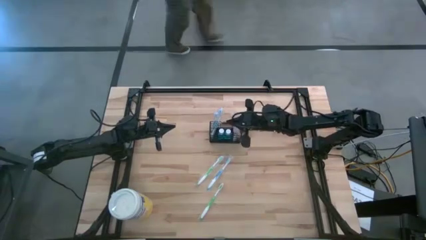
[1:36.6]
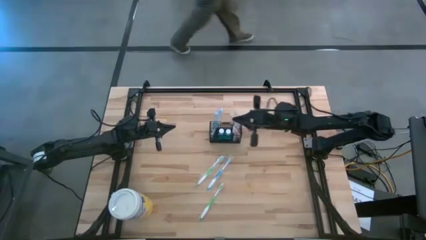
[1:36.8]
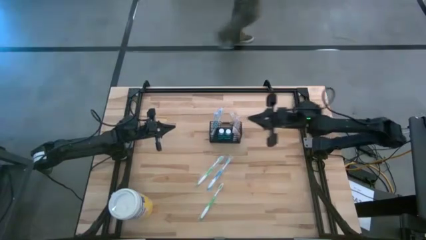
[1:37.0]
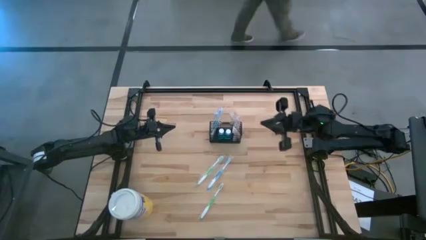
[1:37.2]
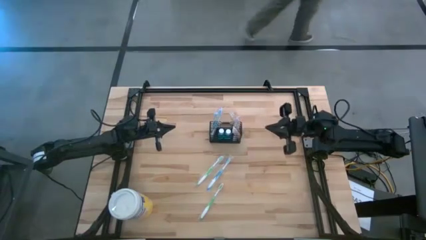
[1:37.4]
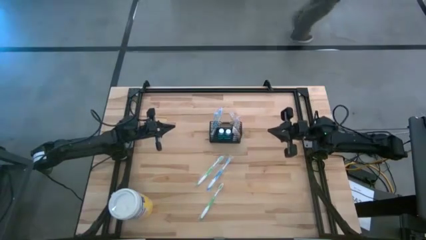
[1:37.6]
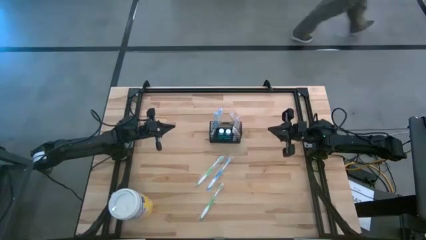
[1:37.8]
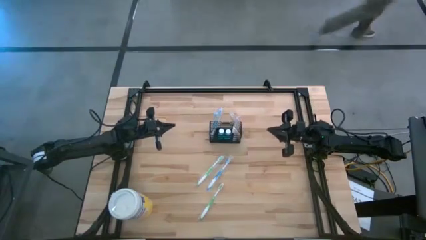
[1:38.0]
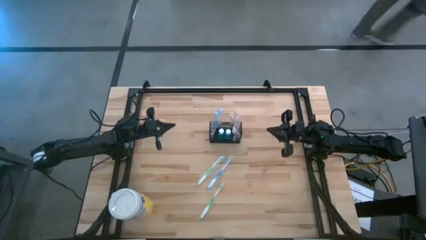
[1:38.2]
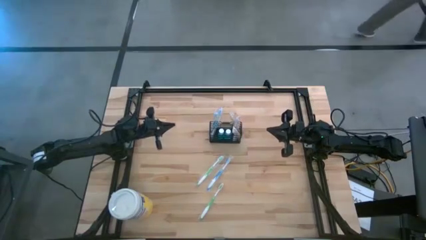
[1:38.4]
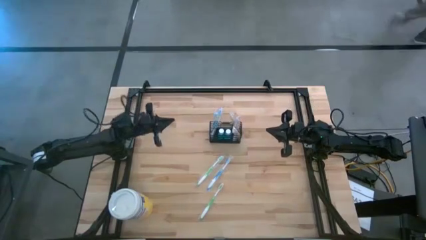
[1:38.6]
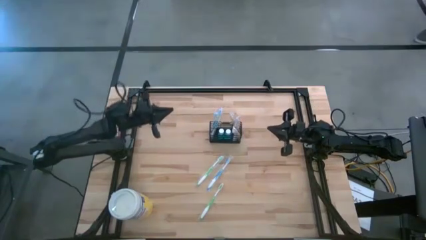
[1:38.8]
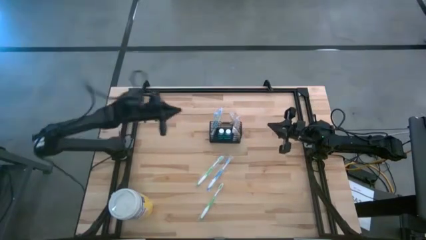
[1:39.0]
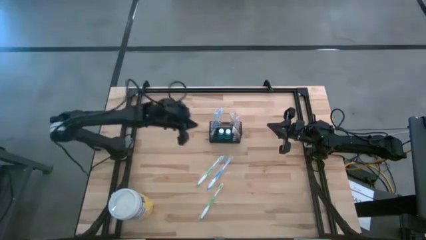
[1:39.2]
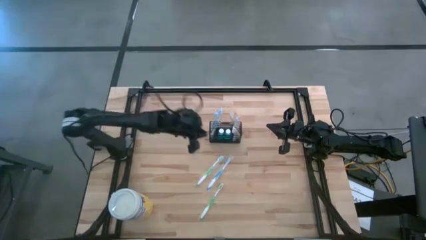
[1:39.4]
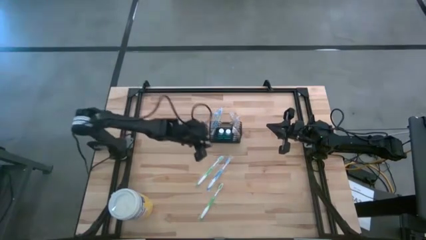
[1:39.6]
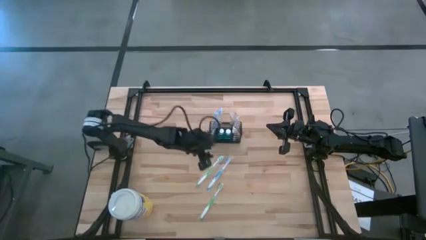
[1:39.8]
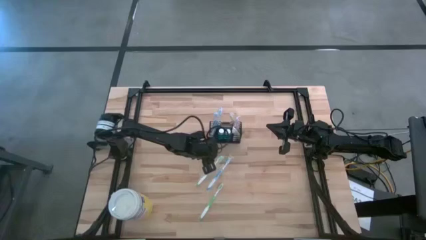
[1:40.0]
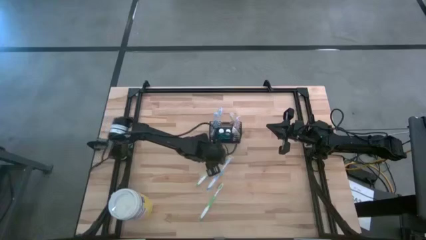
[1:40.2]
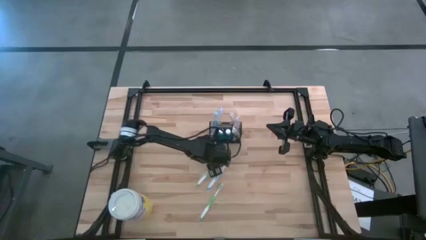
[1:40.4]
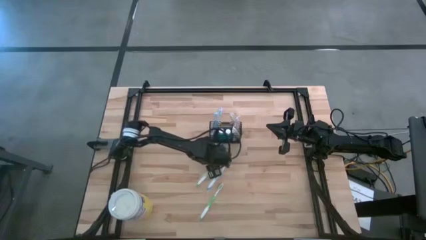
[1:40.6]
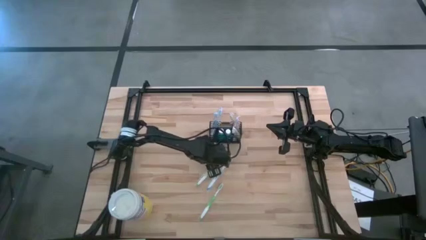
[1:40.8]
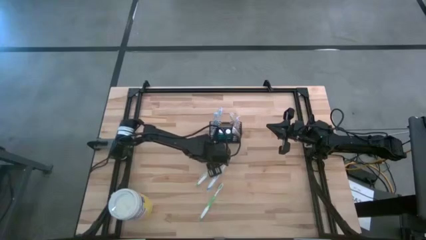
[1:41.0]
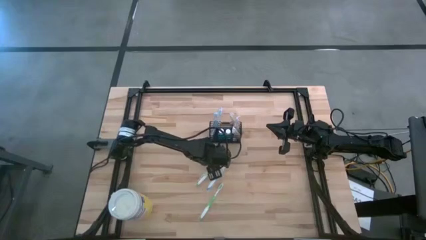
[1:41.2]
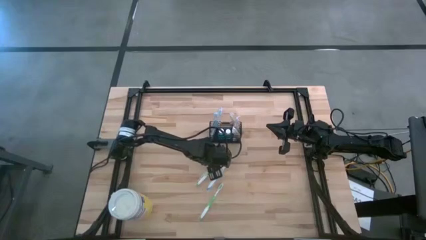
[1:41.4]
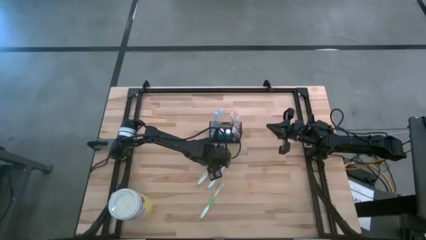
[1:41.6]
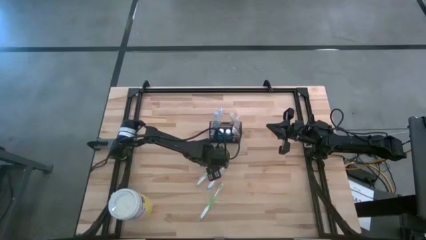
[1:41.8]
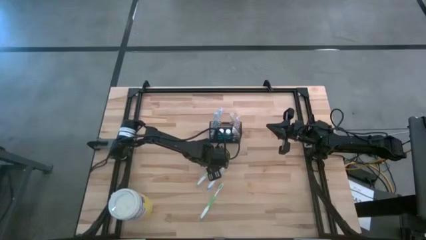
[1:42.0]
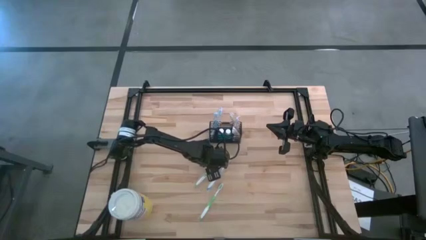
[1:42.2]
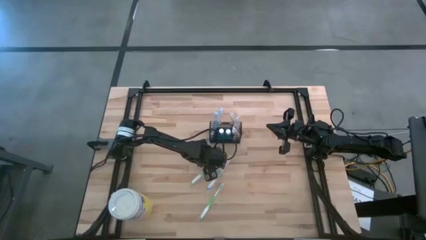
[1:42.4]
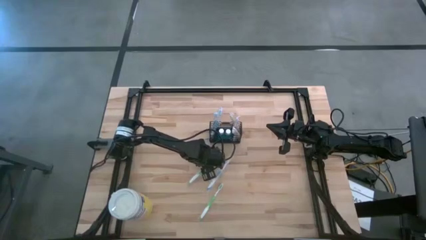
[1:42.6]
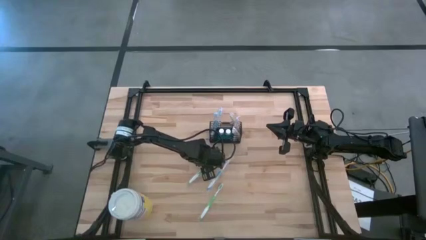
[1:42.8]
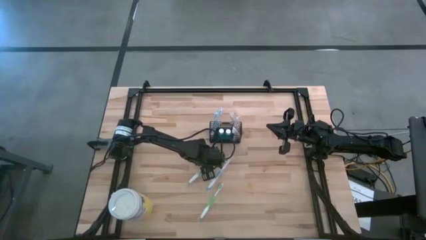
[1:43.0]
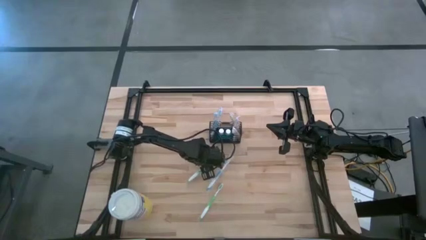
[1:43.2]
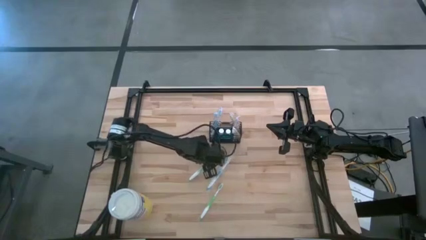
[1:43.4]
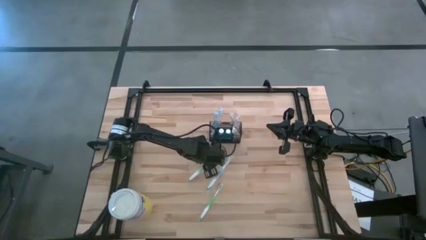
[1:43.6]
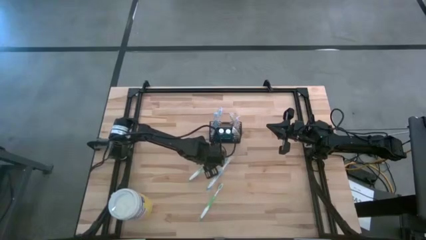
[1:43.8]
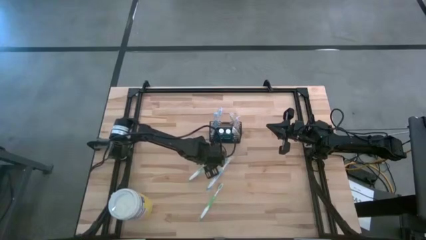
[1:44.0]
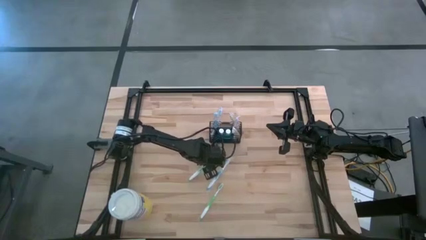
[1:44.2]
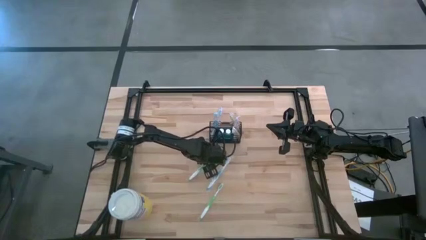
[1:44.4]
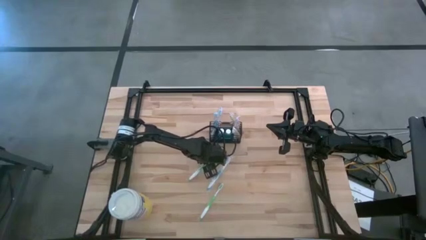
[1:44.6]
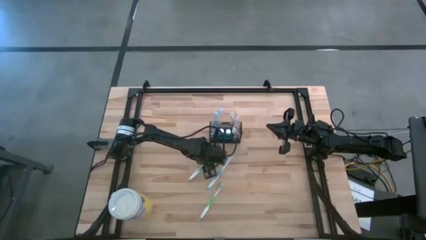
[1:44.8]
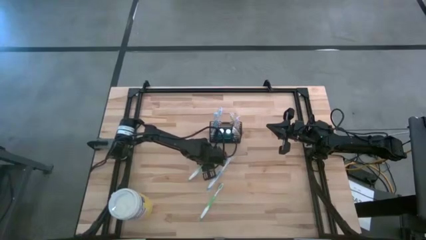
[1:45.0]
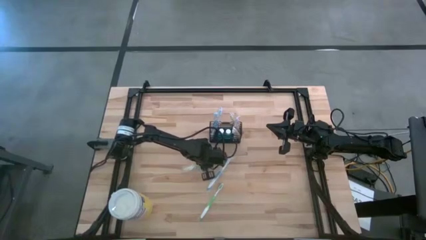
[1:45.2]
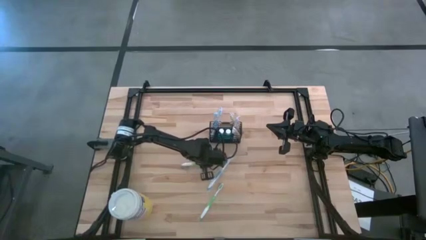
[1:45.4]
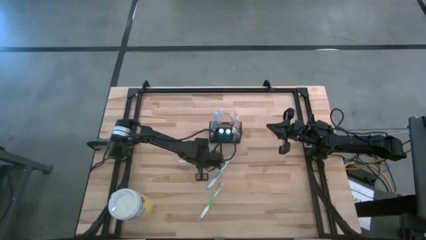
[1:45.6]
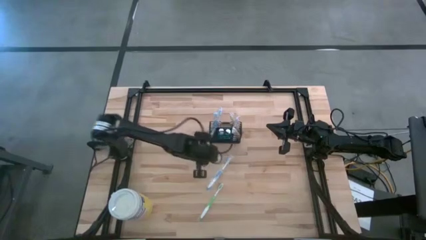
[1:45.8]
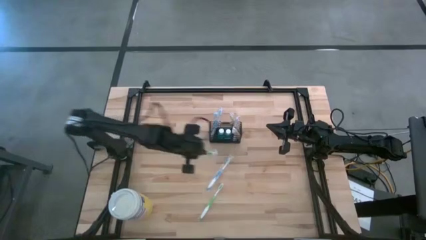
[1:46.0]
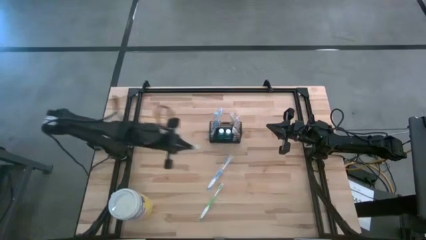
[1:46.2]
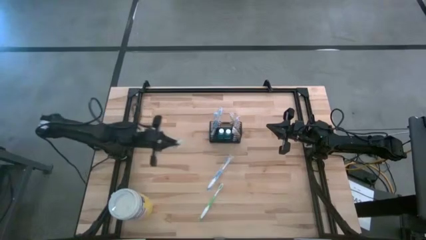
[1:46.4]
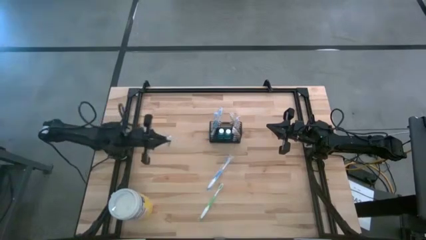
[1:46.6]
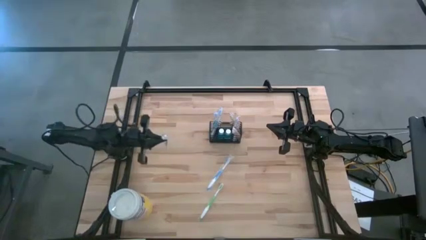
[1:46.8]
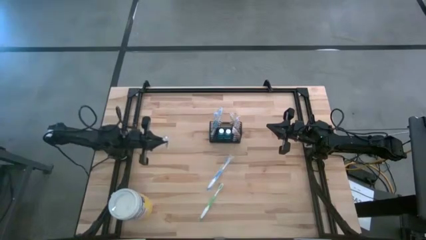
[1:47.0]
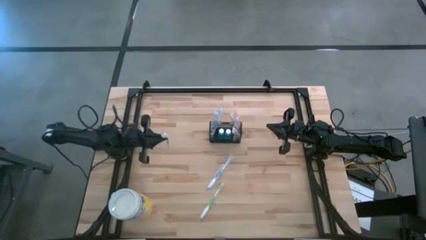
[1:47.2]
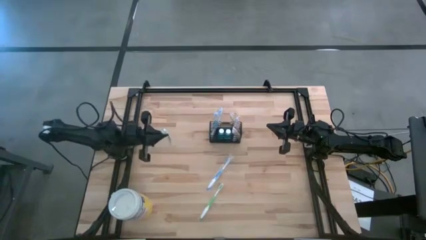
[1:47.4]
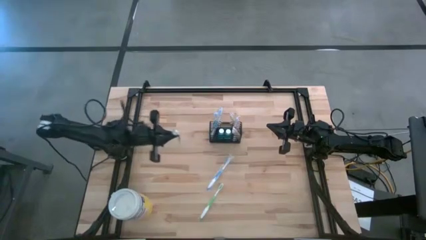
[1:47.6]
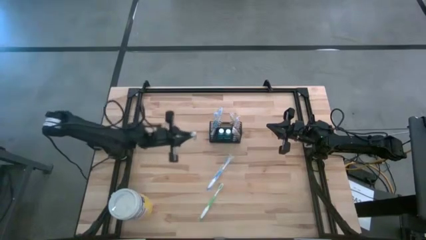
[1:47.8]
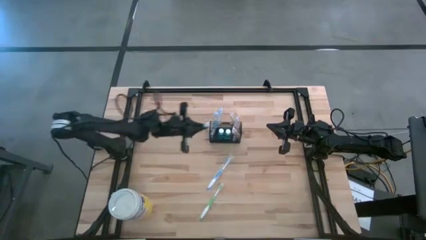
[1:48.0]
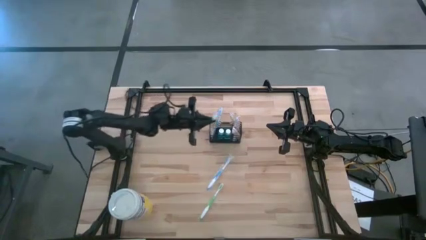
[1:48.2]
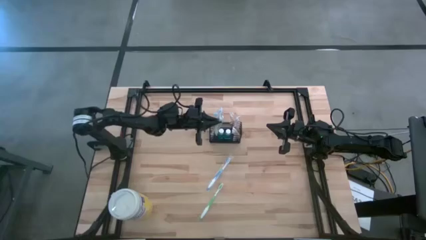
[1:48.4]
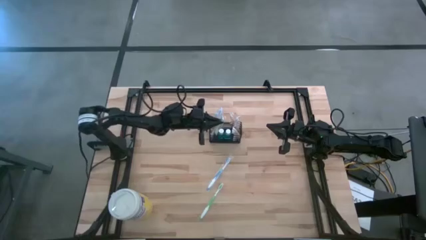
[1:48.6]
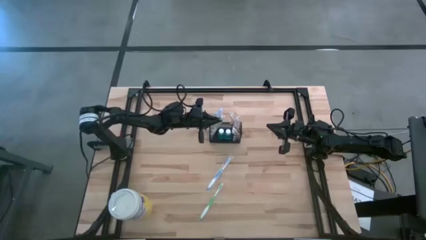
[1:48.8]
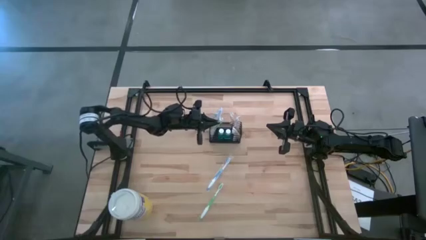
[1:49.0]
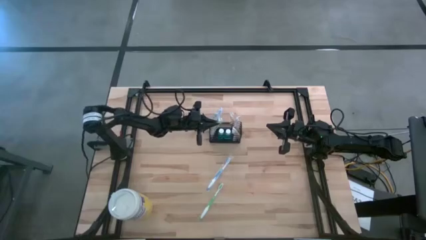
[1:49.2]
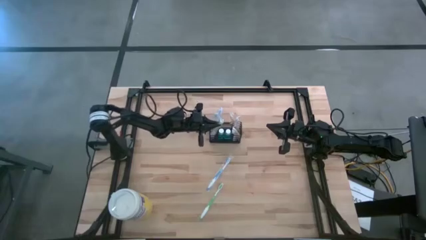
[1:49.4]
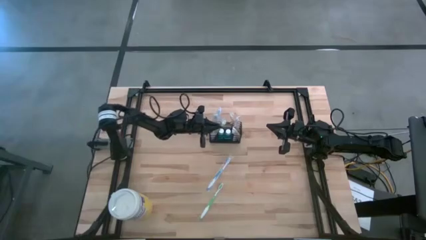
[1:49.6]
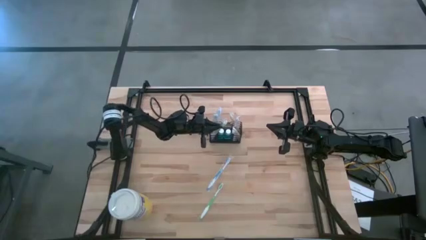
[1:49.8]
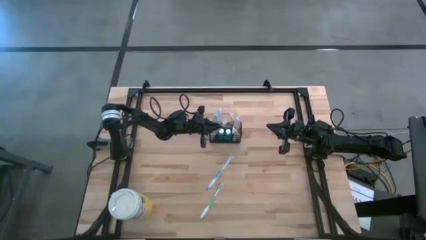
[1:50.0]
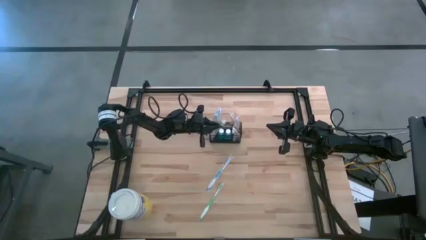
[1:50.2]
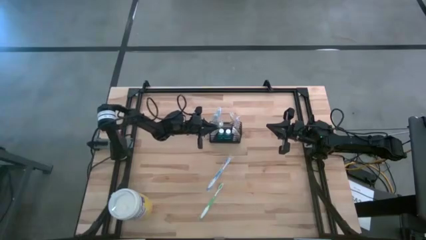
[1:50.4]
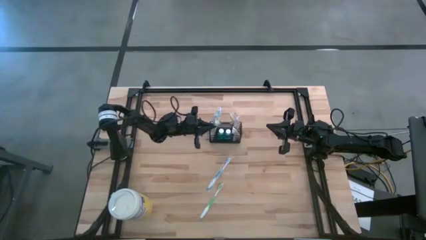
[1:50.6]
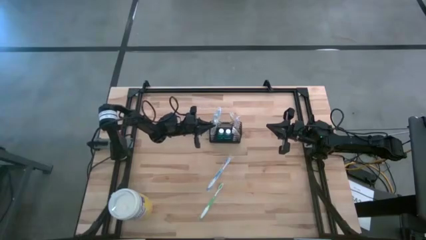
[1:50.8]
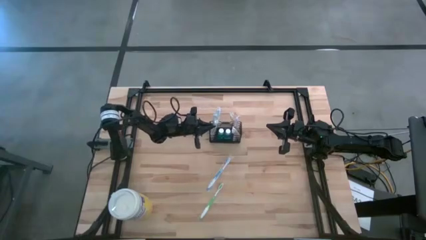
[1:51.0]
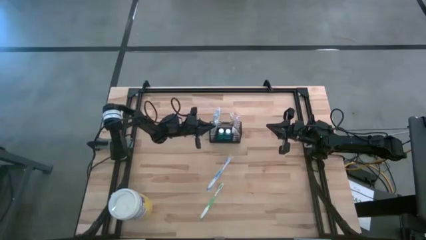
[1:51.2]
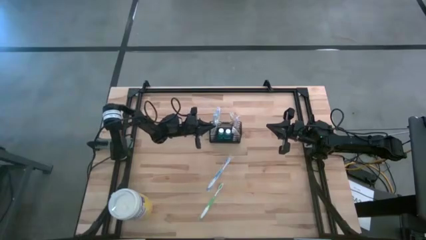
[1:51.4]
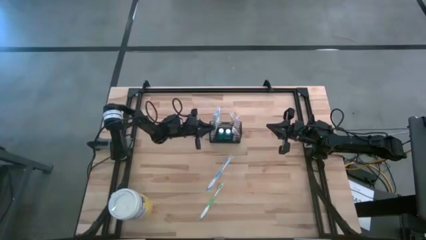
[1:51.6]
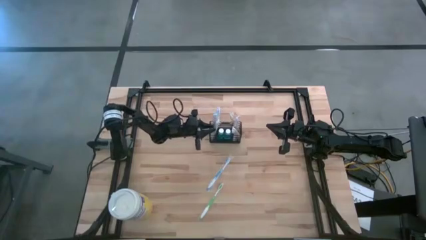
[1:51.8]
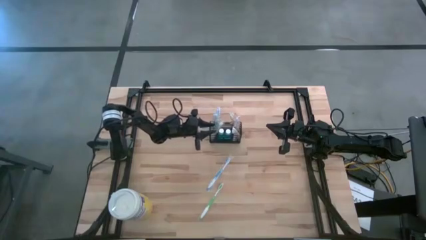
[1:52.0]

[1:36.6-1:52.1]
Task: Pick & Place toothbrushing station
Put the top green toothbrush into the wire organizer

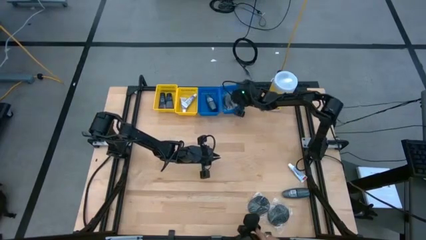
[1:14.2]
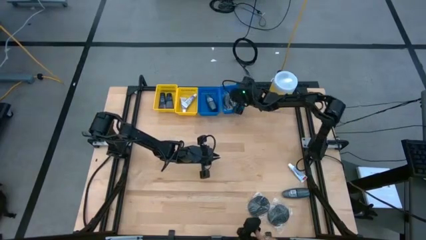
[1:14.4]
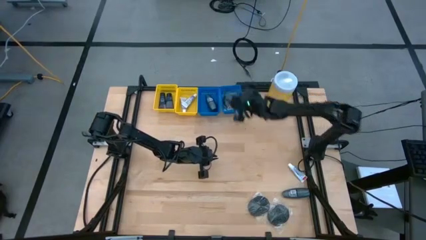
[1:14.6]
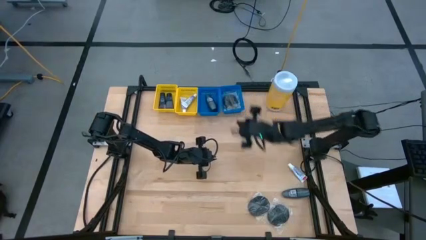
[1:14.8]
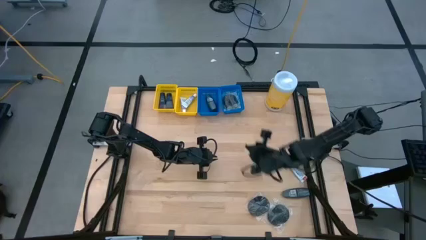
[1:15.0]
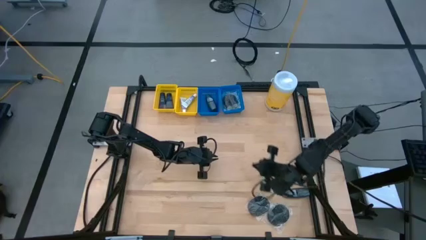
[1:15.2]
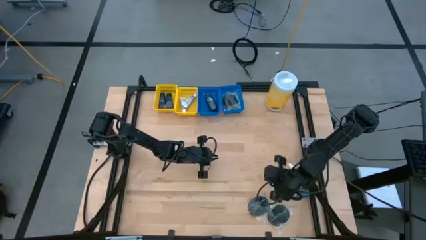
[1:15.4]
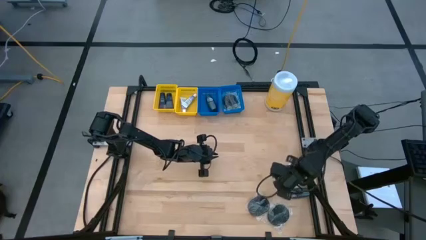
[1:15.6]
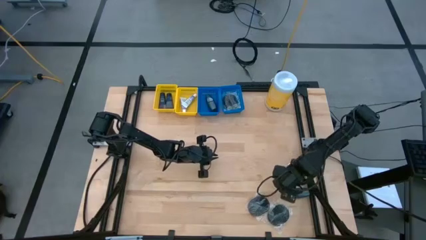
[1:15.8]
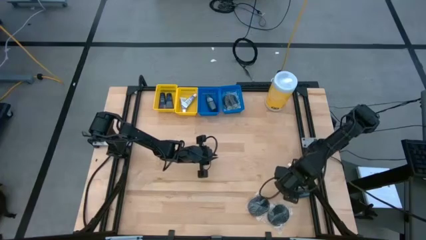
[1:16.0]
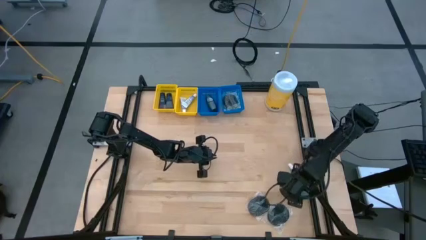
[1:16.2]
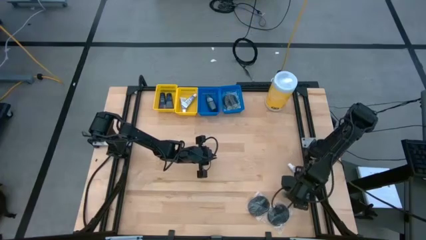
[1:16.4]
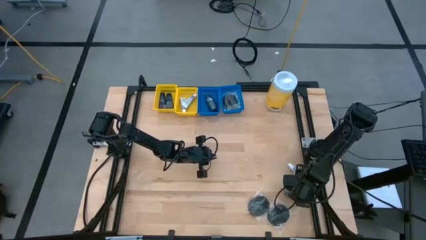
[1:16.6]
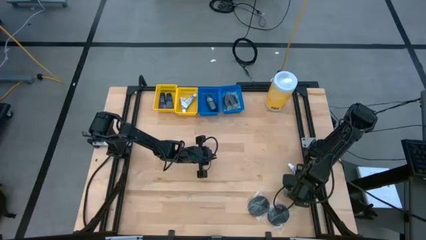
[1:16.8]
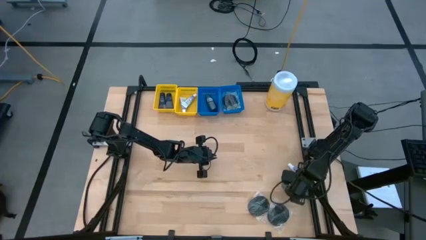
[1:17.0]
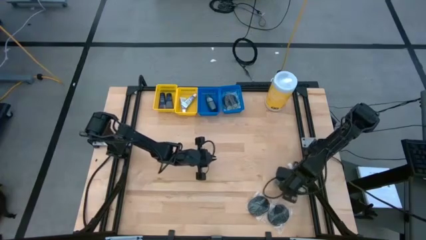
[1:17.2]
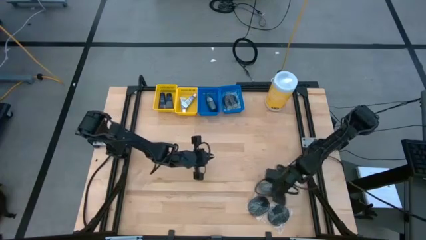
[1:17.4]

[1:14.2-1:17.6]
Task: Pick & Place Travel size toiletries
Put the black roll-on deodorant into the left blue bin
